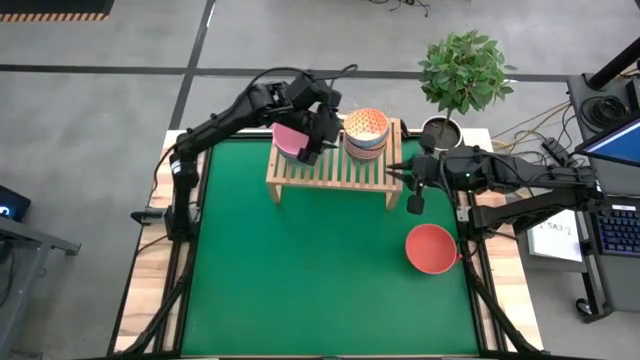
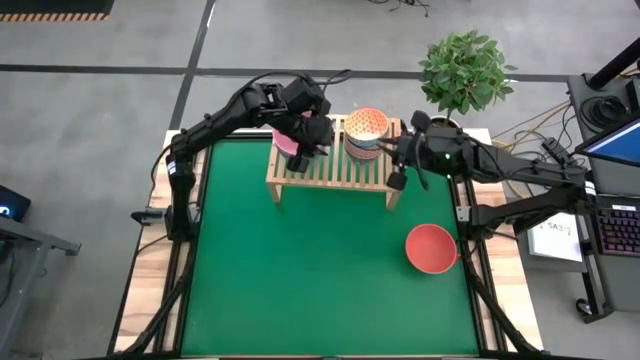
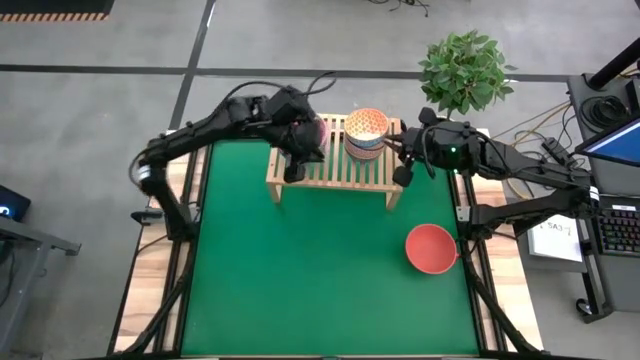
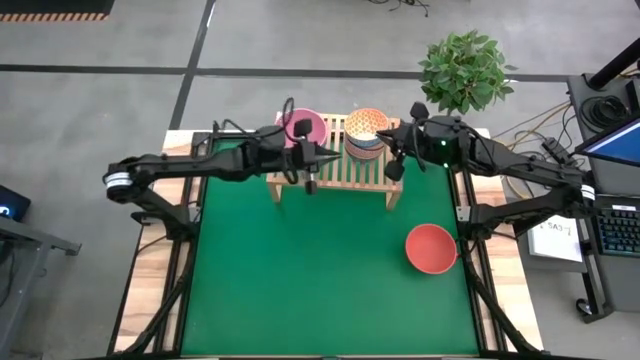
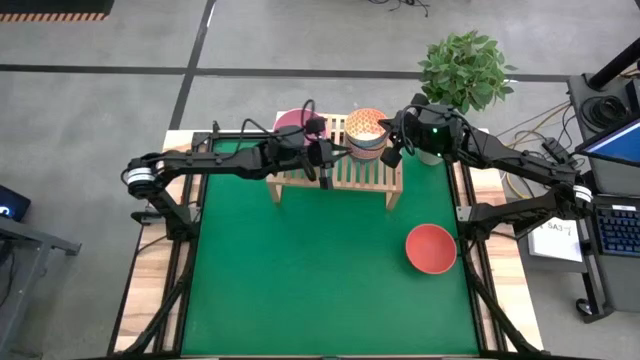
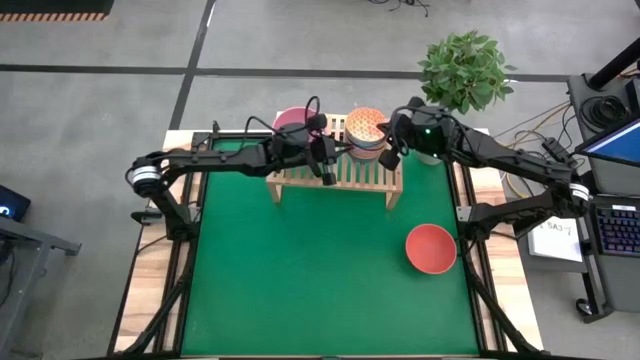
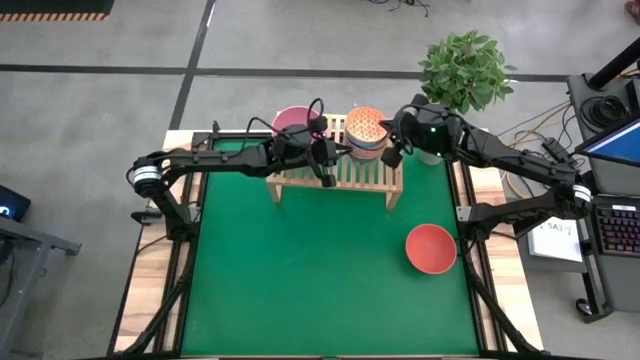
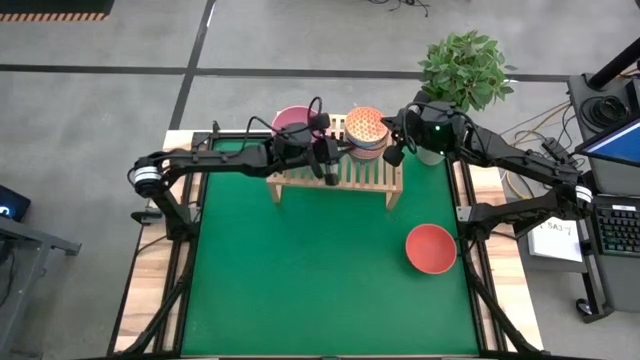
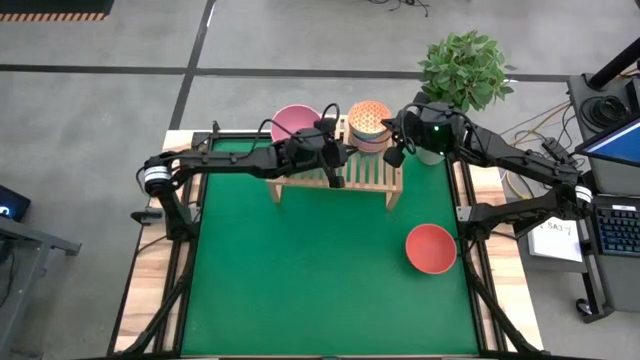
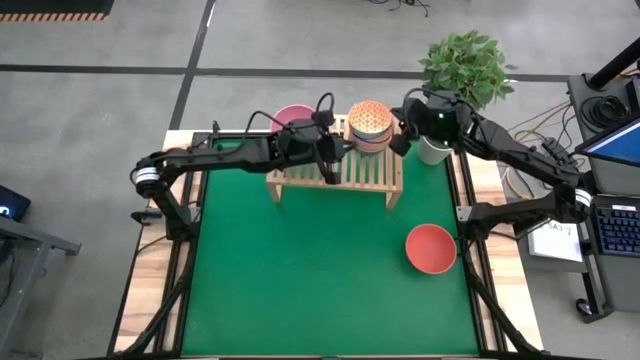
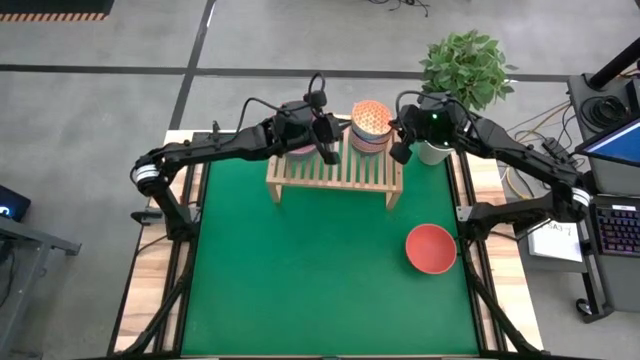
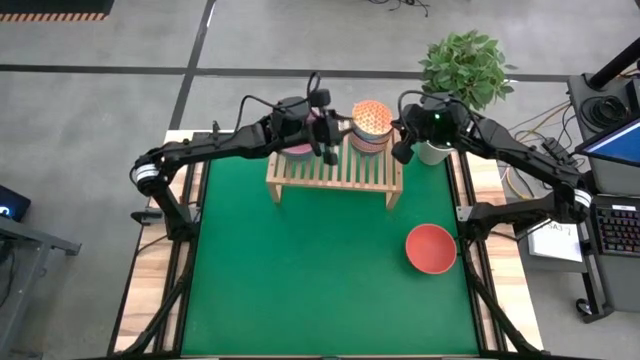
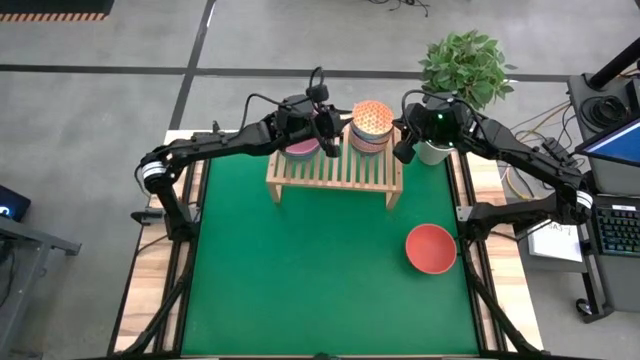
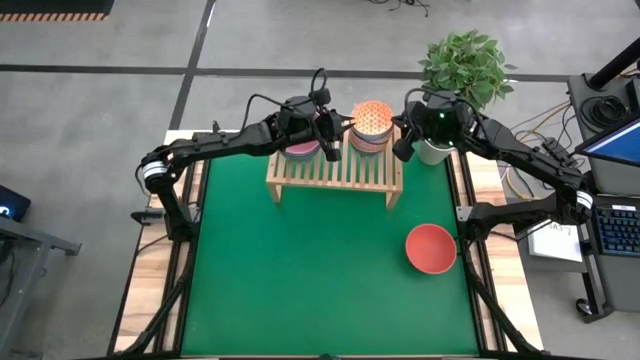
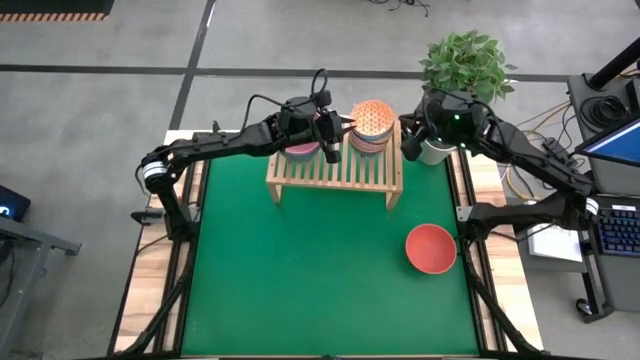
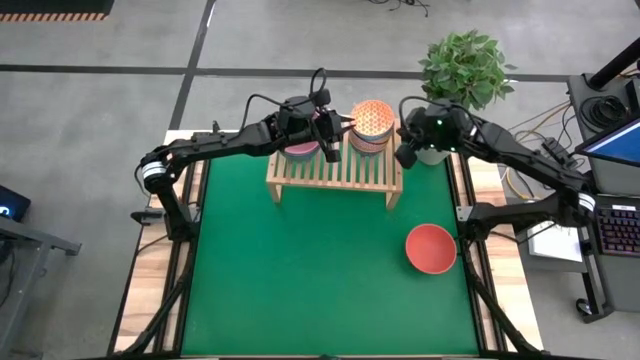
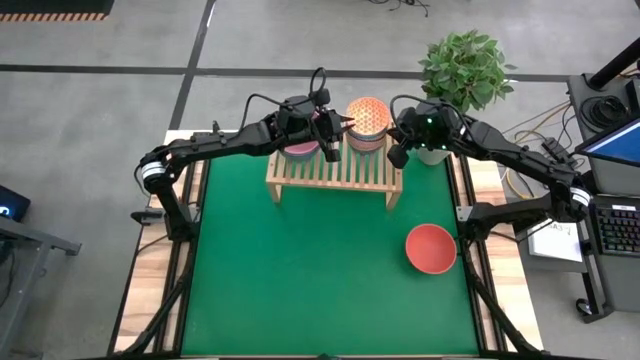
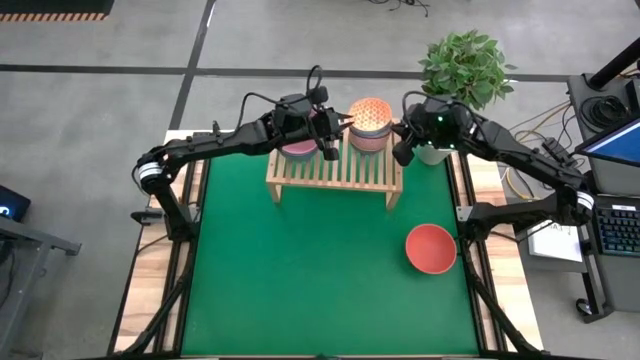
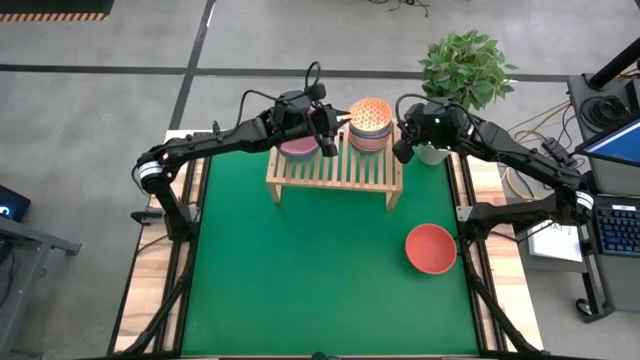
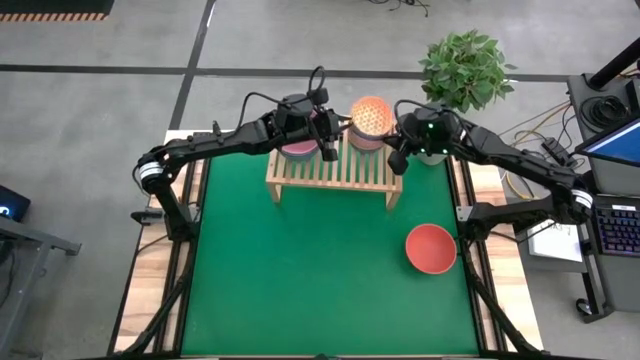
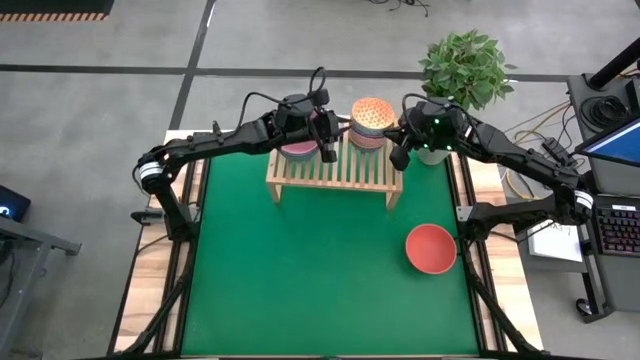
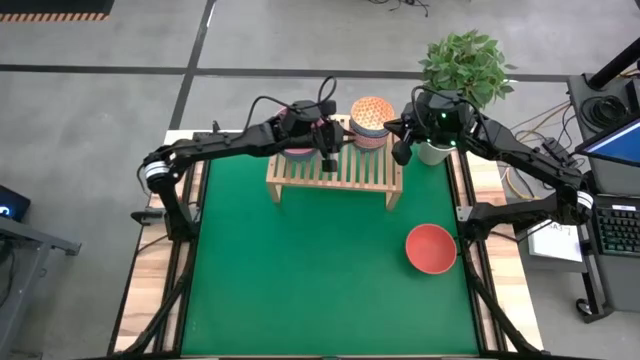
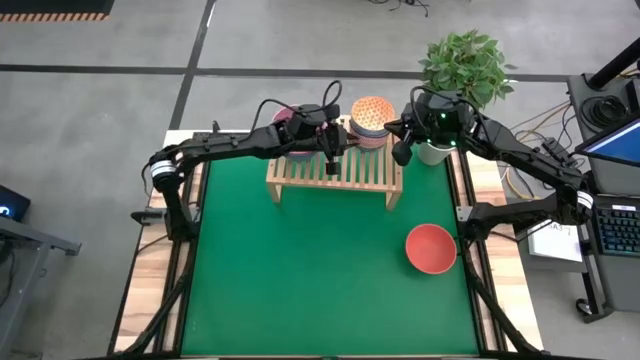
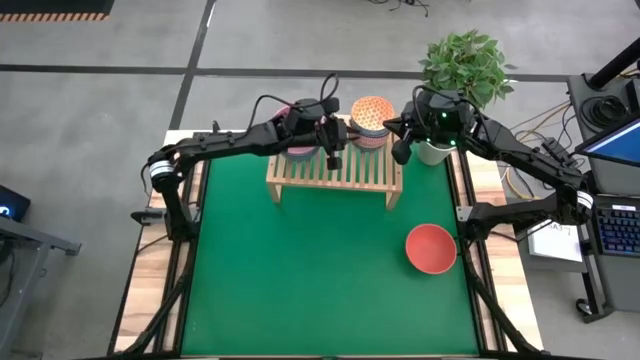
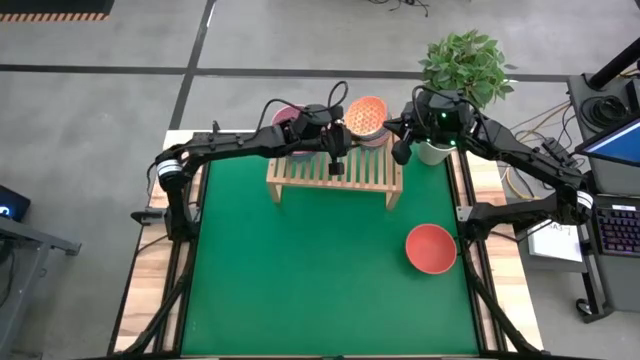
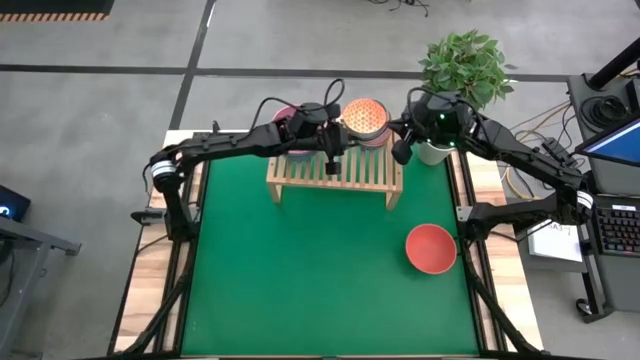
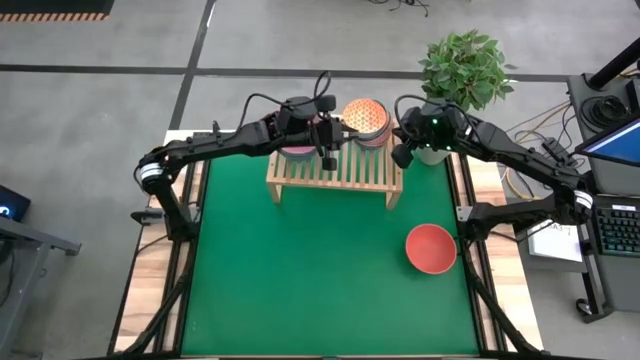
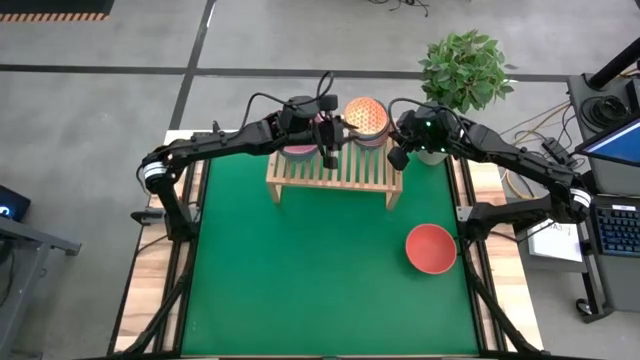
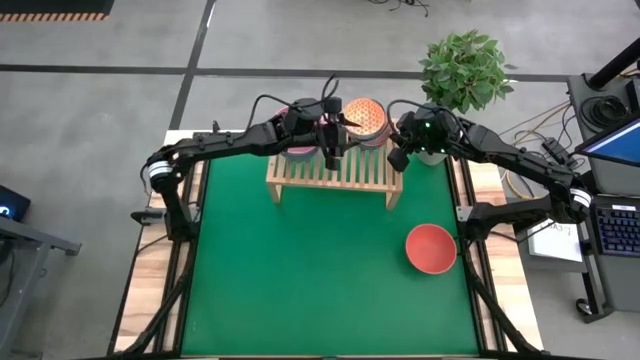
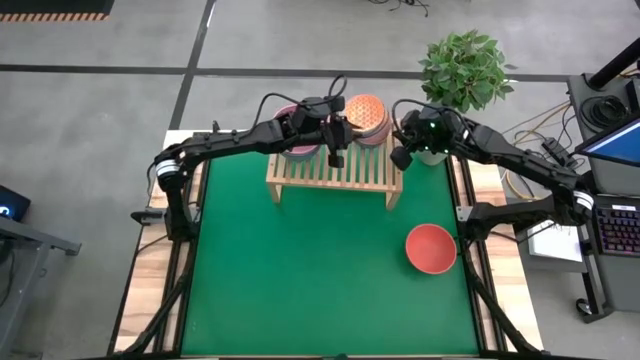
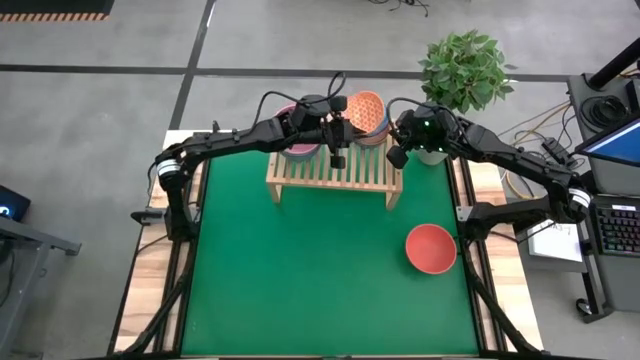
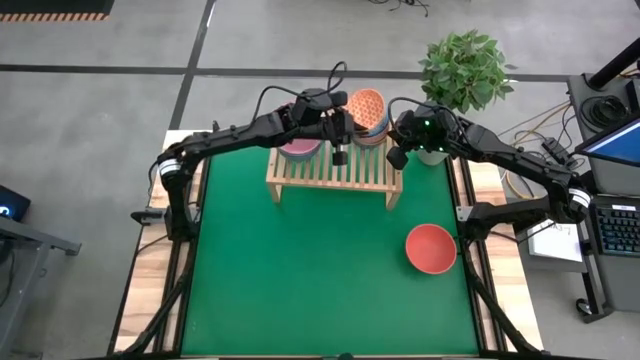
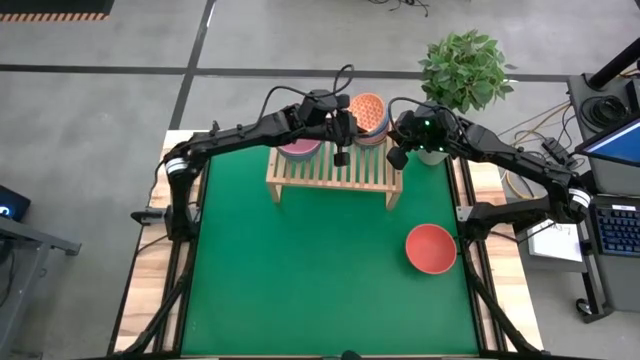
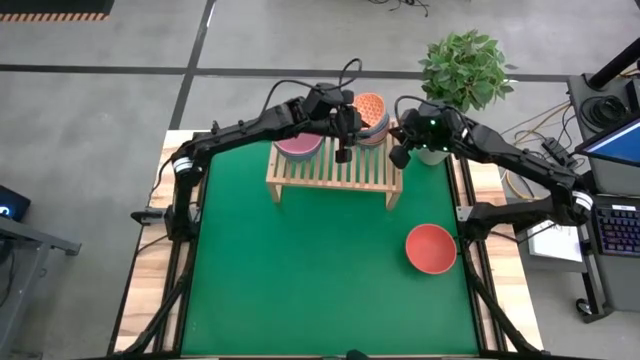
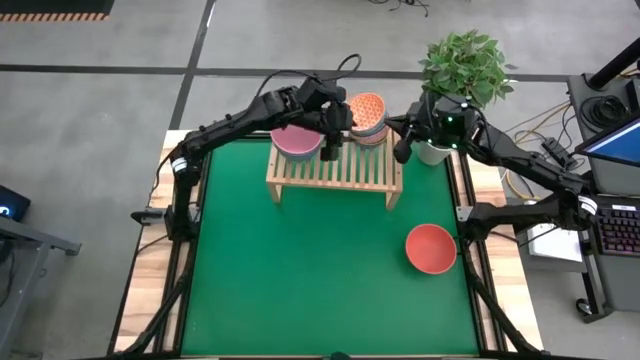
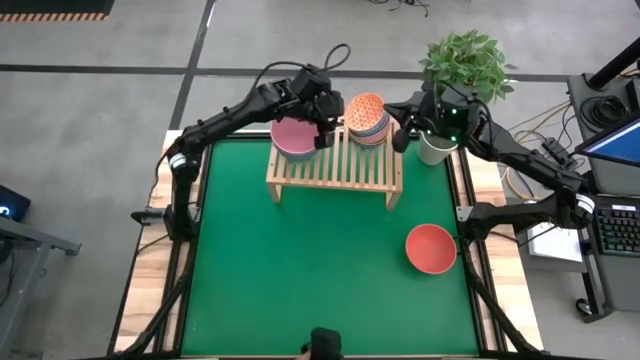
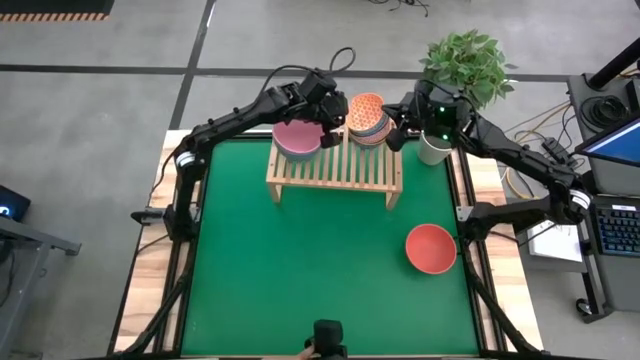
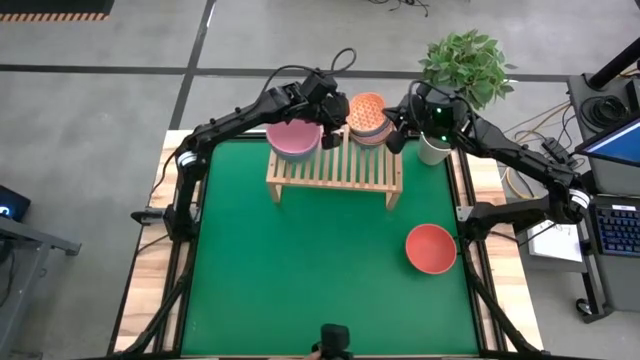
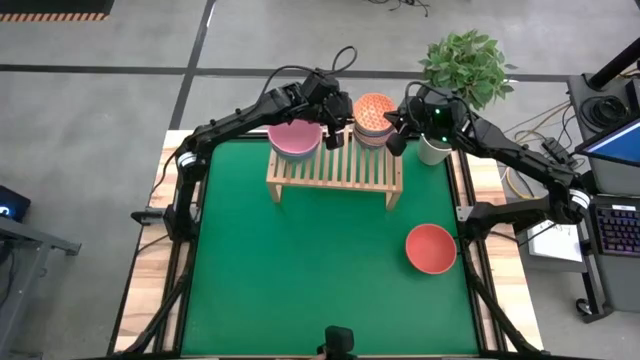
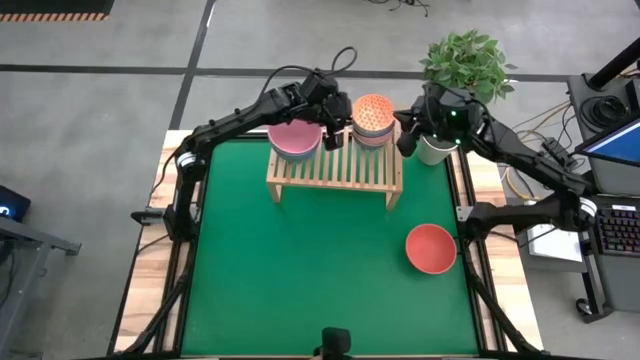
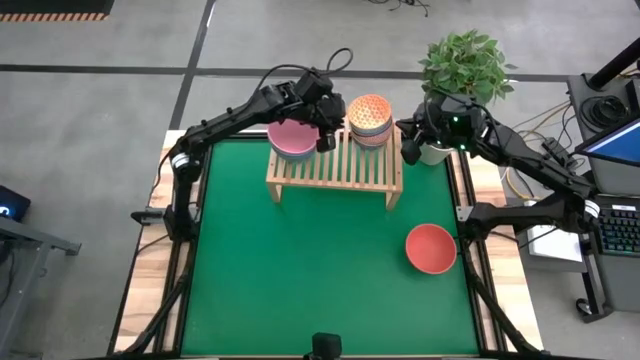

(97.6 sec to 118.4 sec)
Task: Place and stack bowls onto a shelf
Adjust the stacked patterned bowls on the shelf

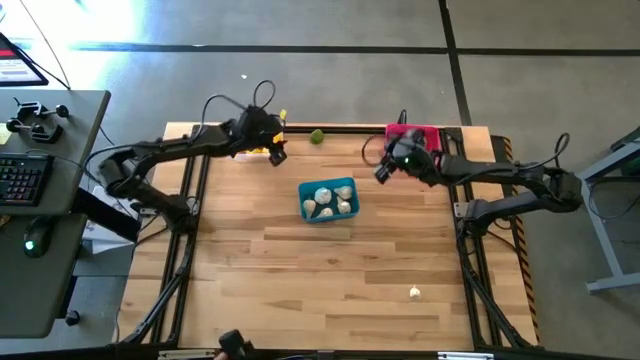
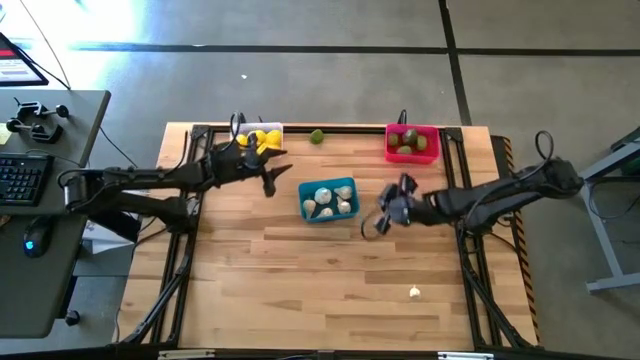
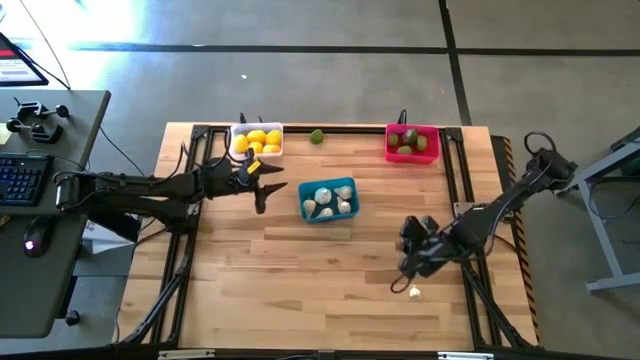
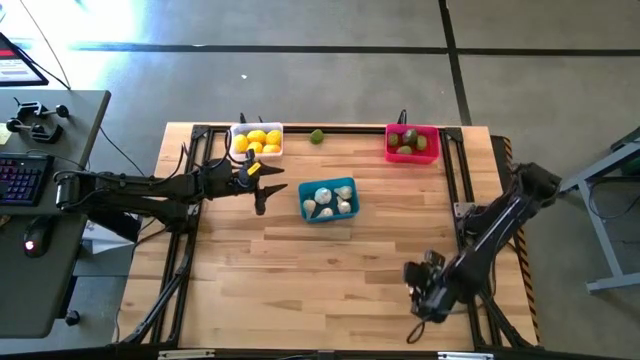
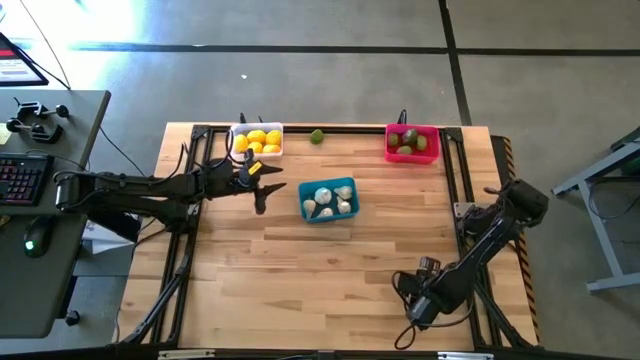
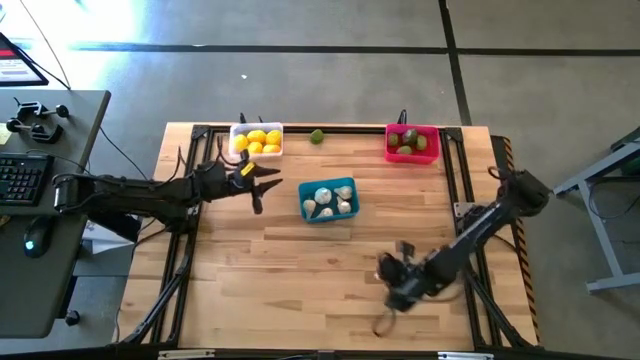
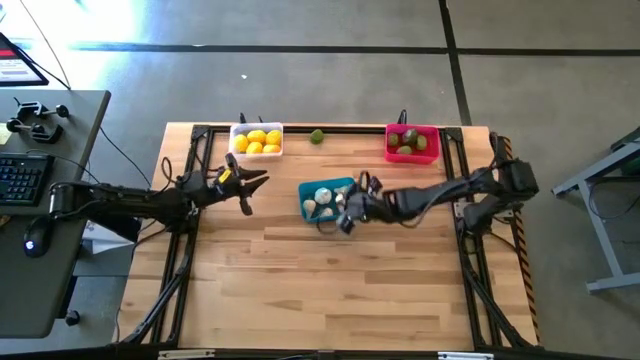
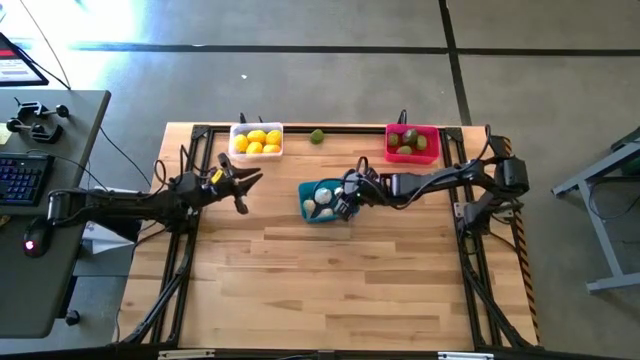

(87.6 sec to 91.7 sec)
Task: Sort produce into baskets
Put the garlic into the blue bin
